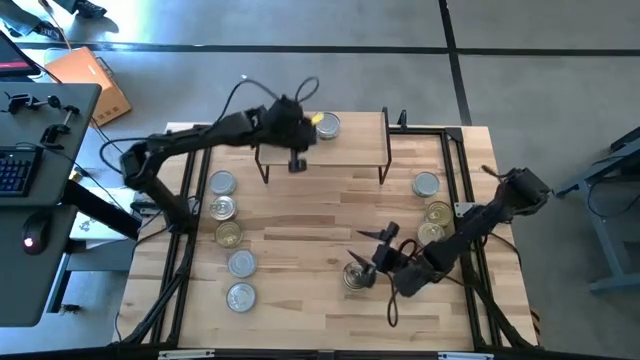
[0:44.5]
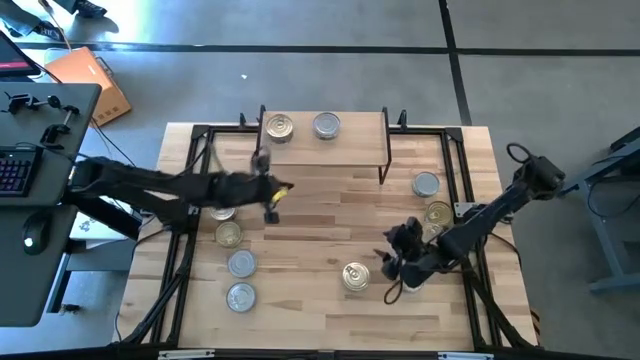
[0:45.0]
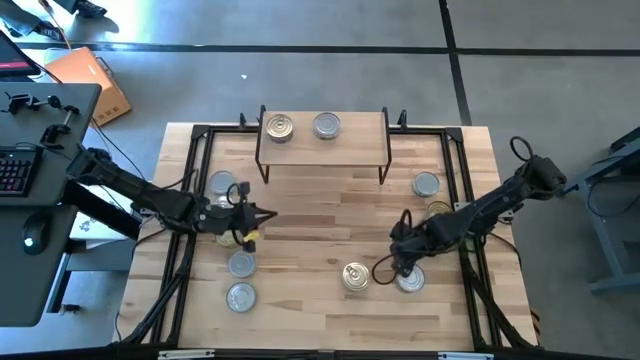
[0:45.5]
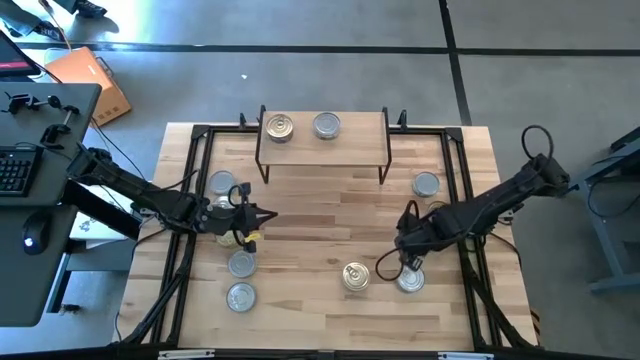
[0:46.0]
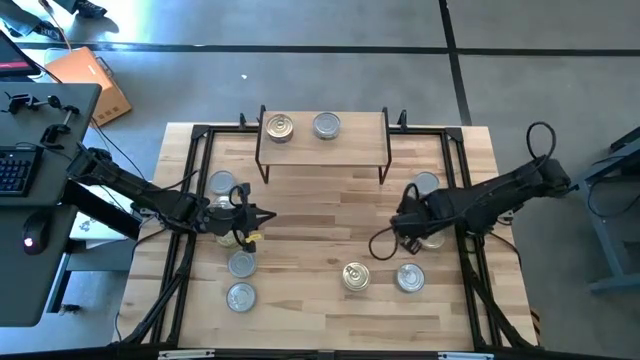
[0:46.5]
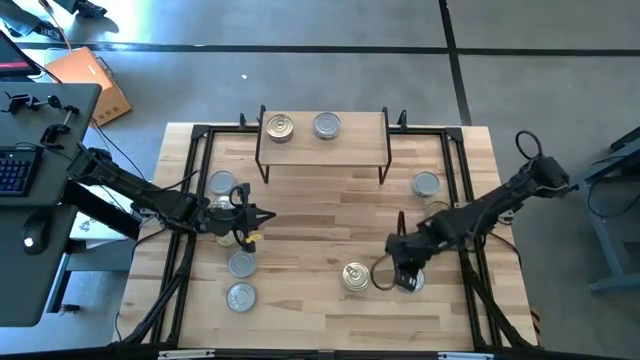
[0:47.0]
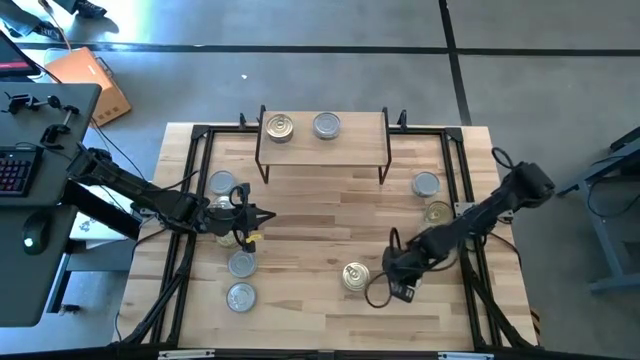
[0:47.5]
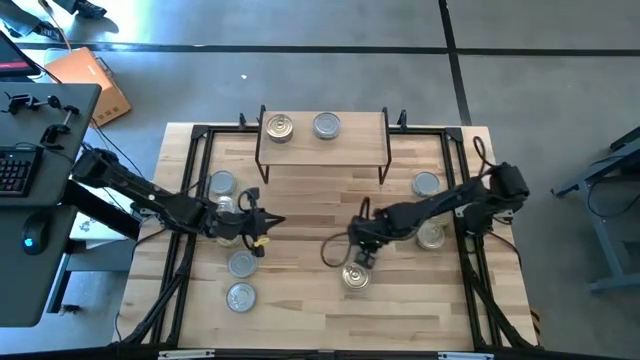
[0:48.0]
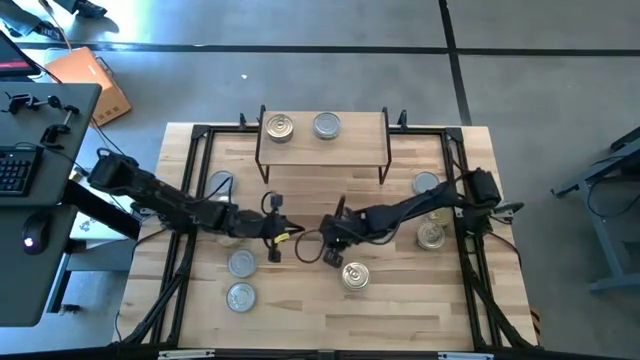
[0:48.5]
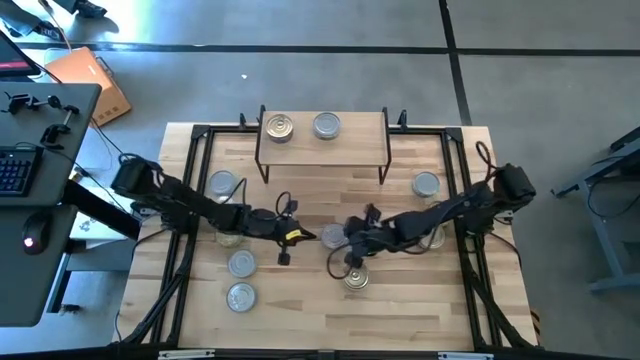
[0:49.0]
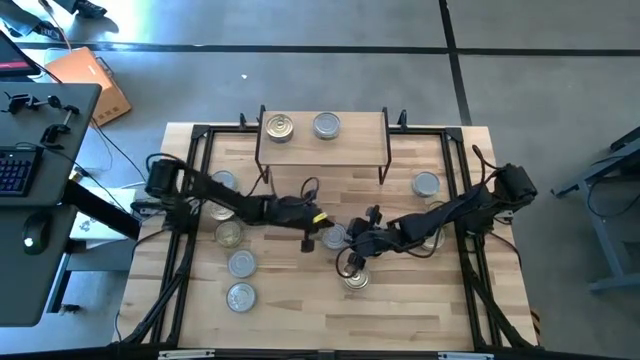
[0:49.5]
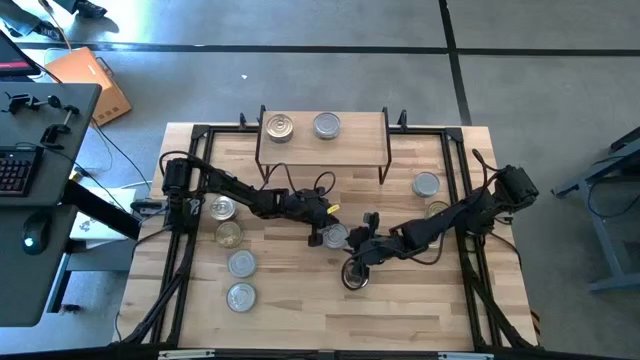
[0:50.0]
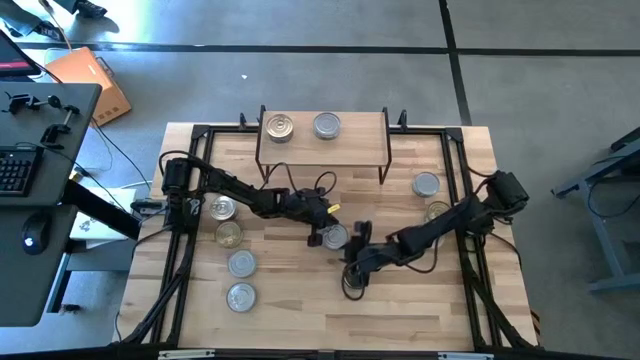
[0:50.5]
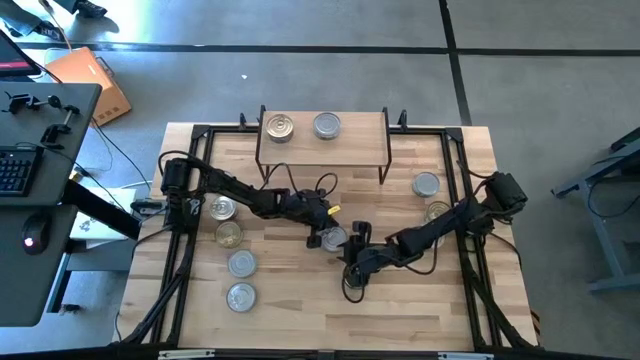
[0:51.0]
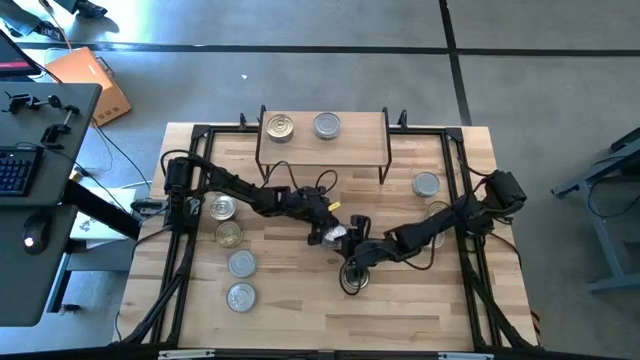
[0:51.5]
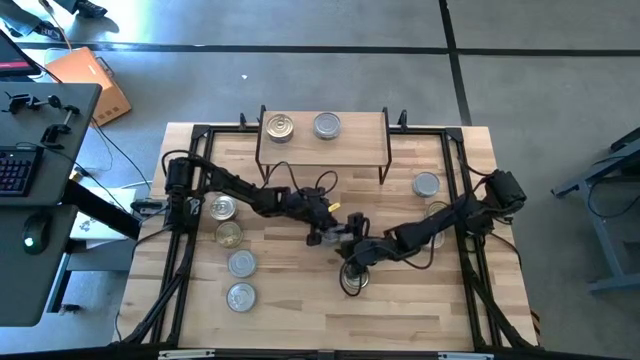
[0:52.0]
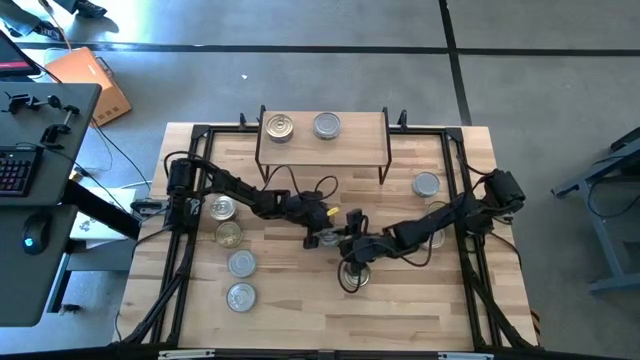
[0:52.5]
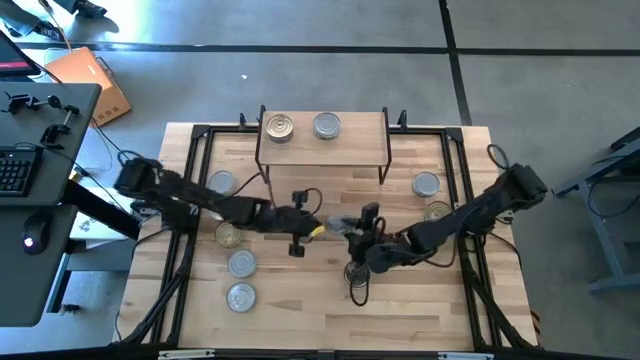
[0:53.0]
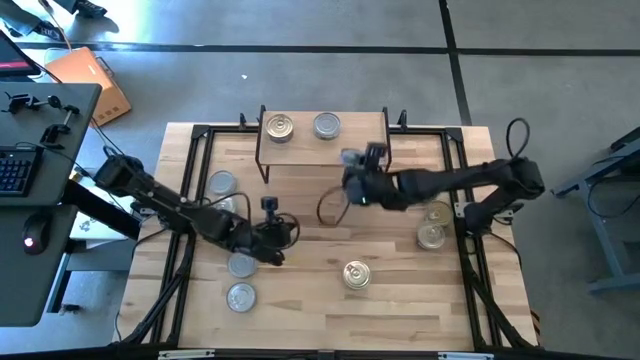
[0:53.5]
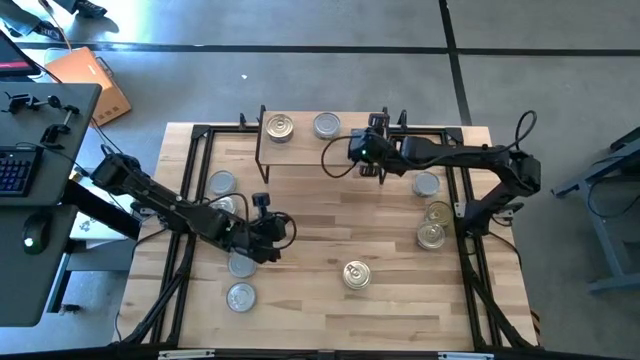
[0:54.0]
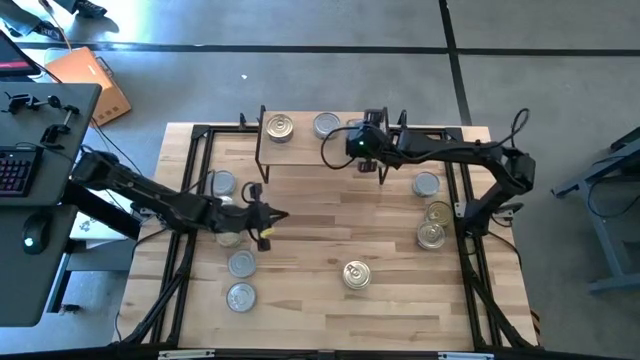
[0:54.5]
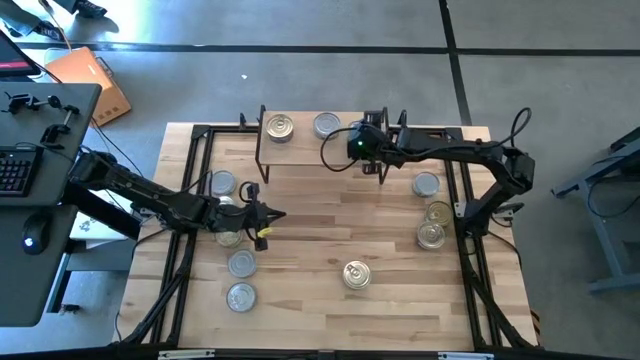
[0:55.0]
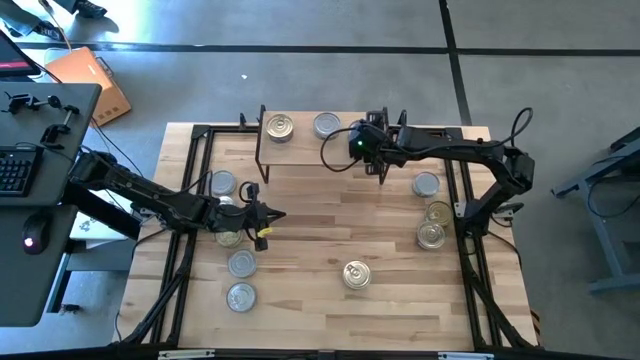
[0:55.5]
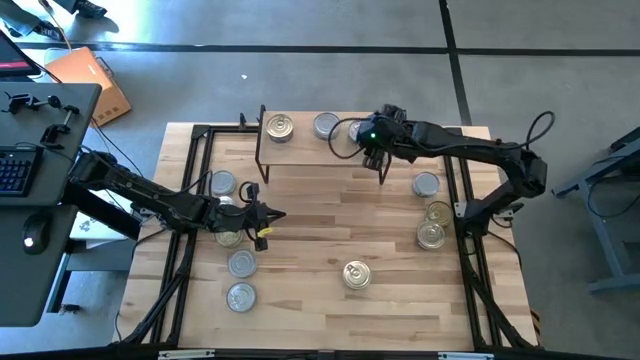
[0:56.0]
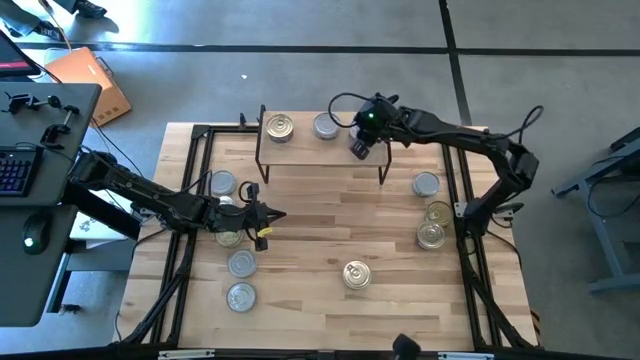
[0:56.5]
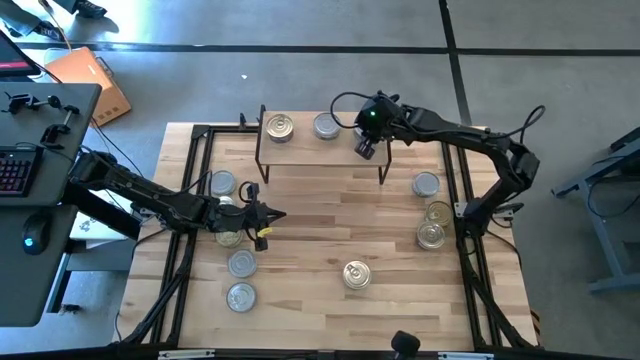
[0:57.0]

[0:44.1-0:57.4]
Task: Stack canned seafood by type on shelf
Put the green tuna can on the shelf

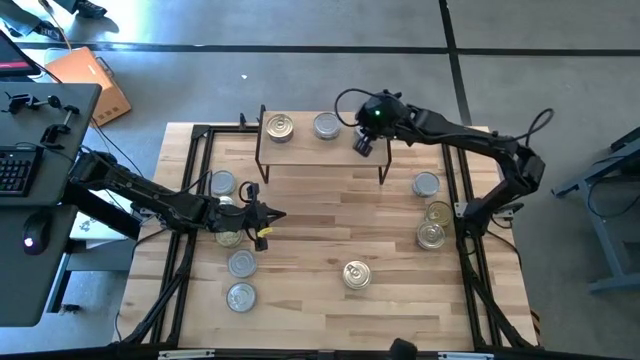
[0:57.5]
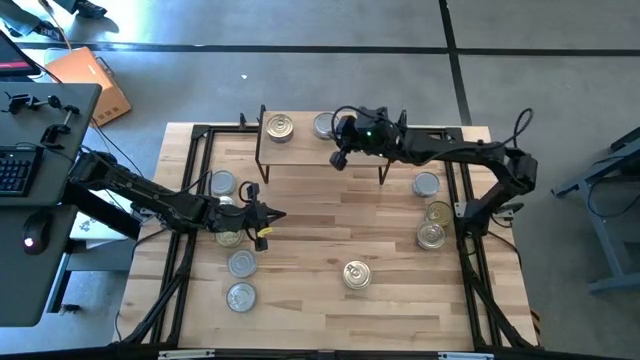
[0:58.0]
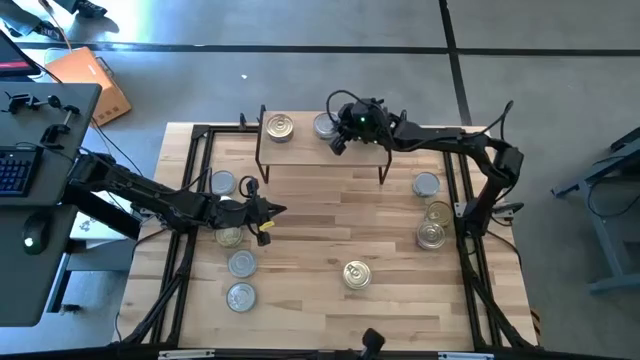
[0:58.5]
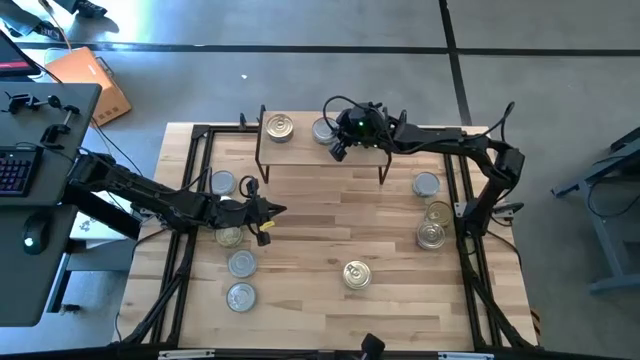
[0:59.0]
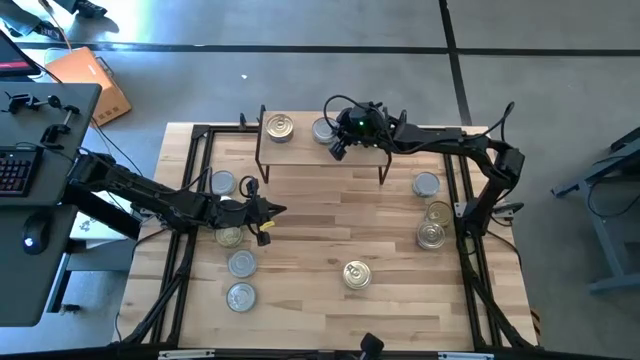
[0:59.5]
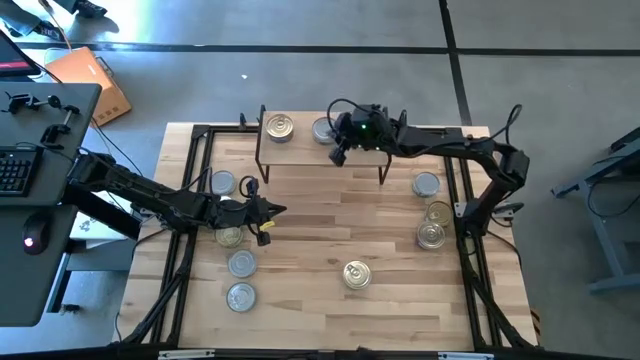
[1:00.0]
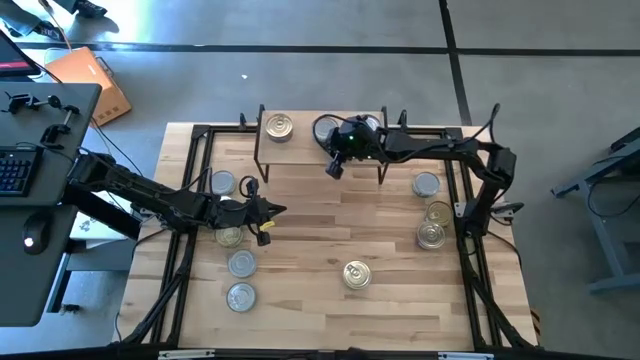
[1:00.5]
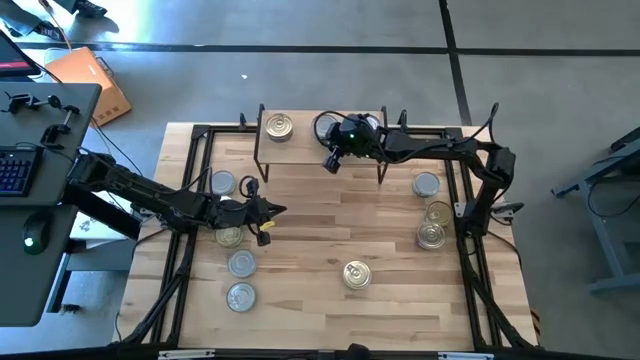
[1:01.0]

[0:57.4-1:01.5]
Adjust the green and white tuna can on the shelf
